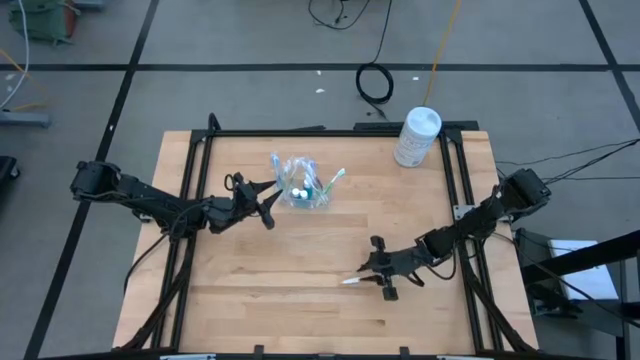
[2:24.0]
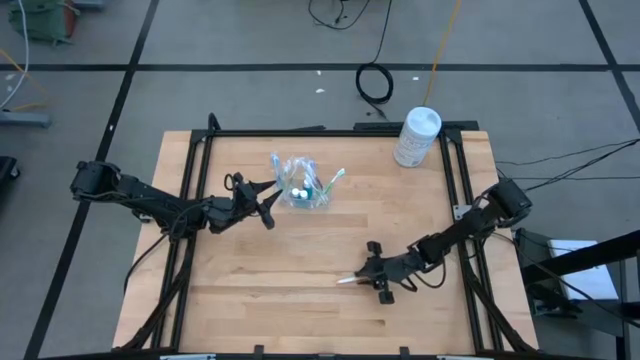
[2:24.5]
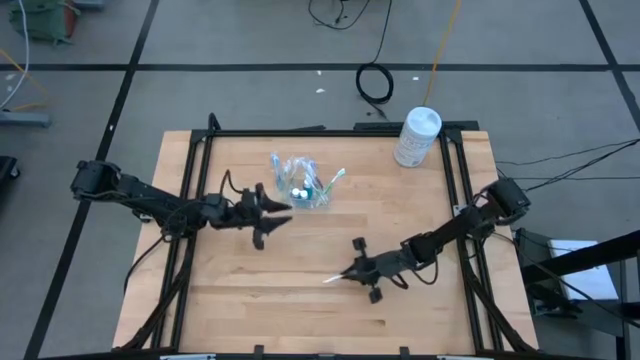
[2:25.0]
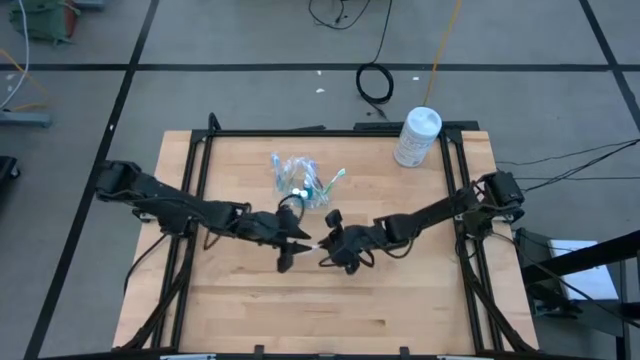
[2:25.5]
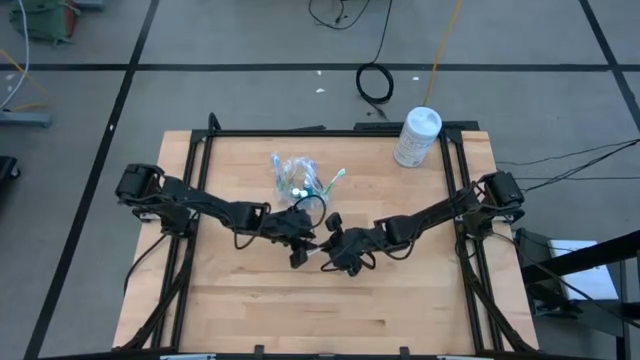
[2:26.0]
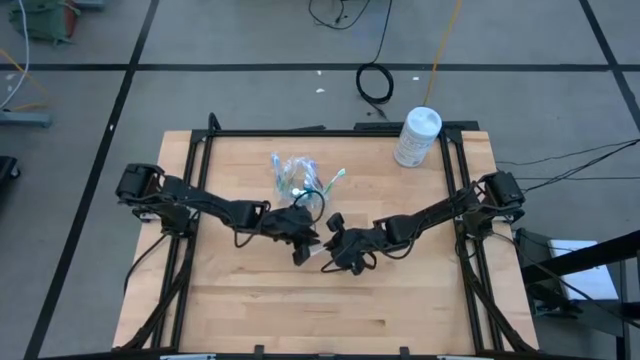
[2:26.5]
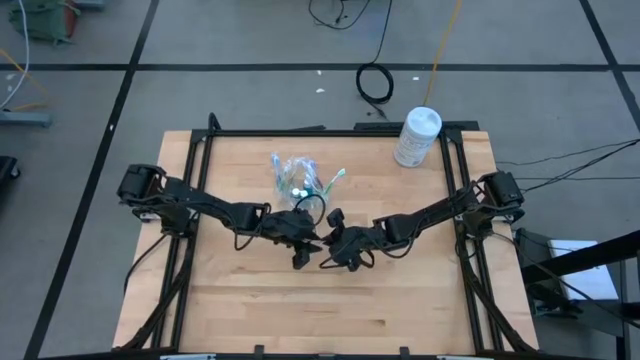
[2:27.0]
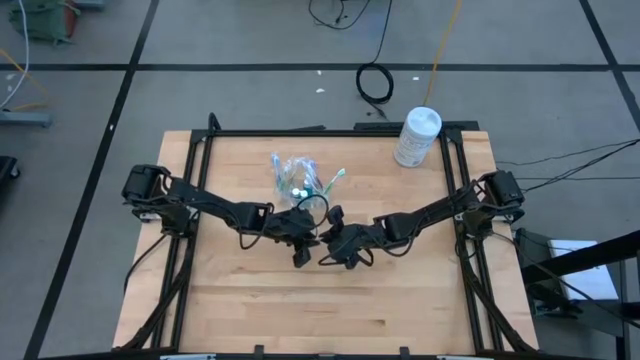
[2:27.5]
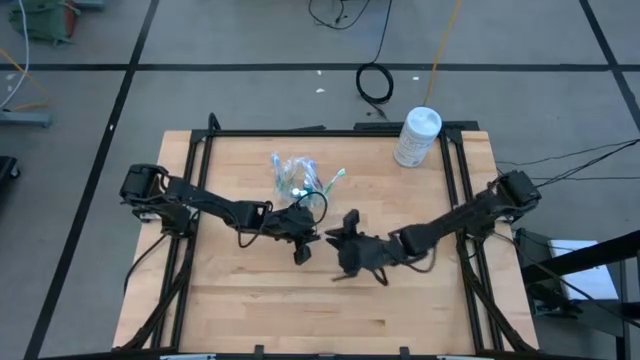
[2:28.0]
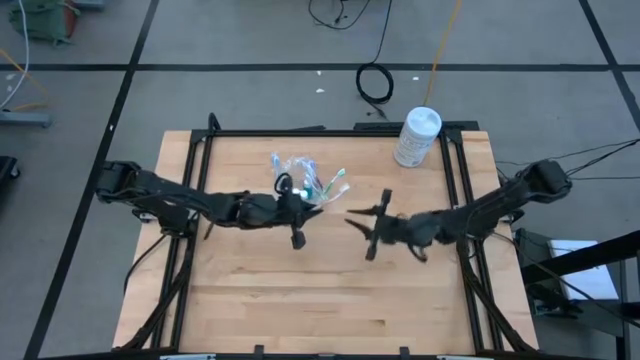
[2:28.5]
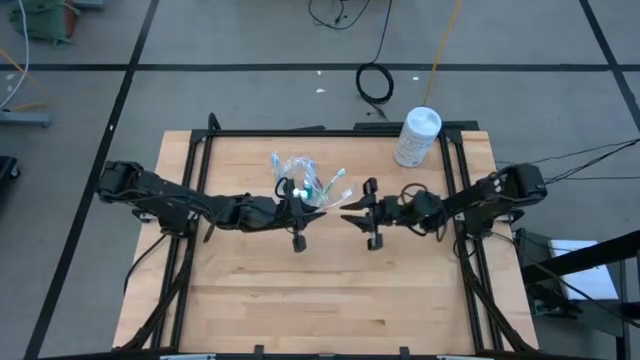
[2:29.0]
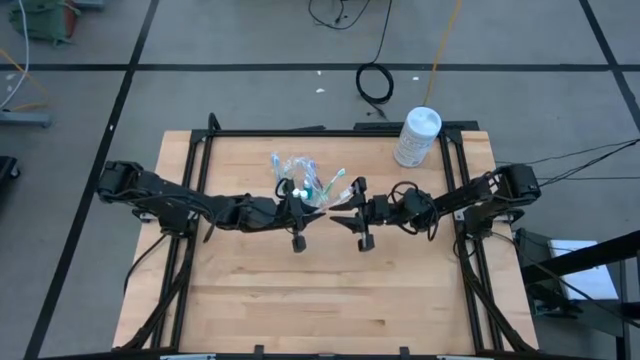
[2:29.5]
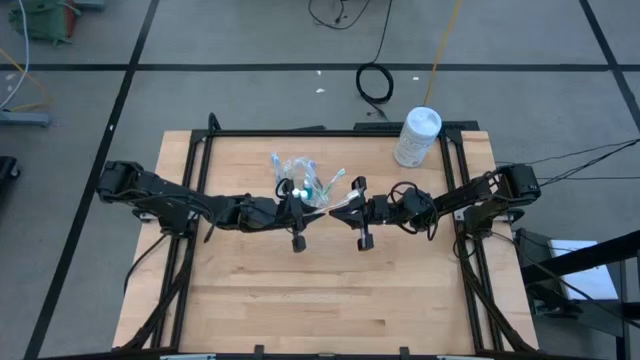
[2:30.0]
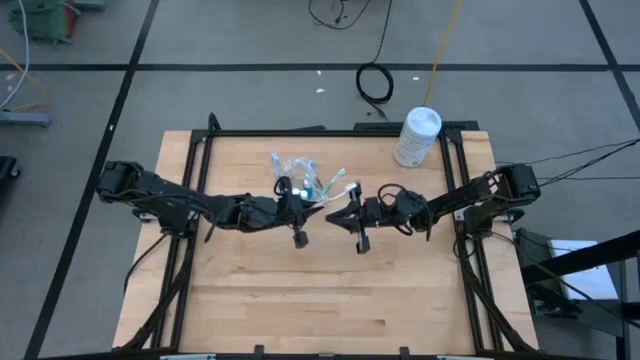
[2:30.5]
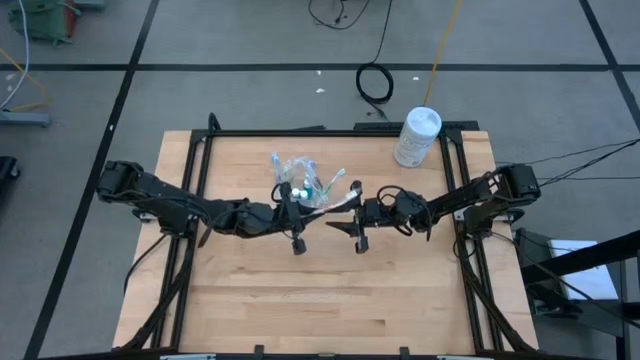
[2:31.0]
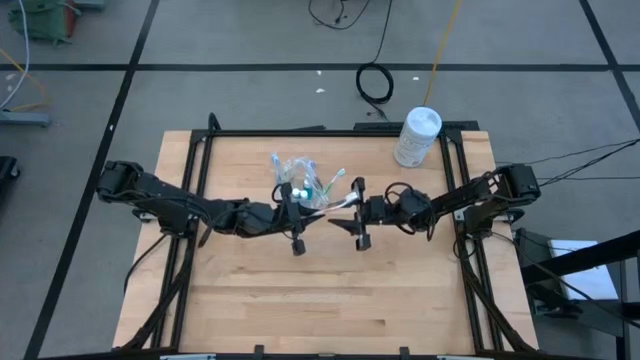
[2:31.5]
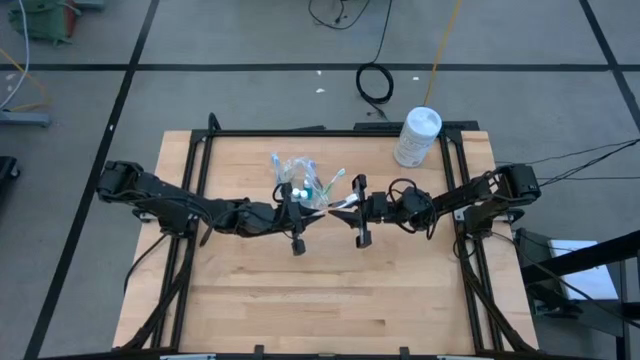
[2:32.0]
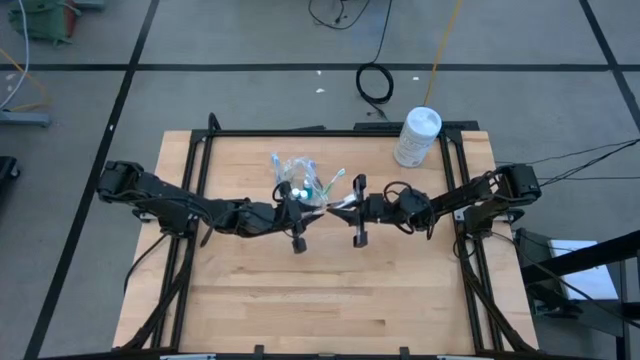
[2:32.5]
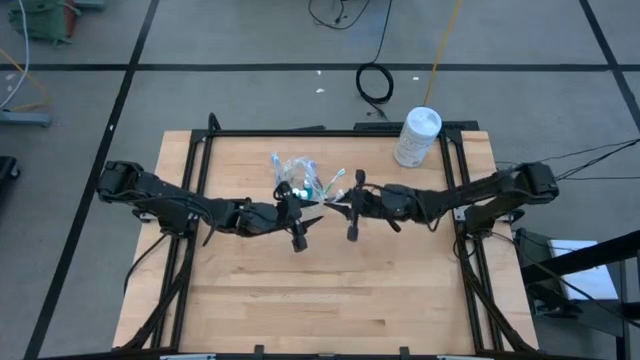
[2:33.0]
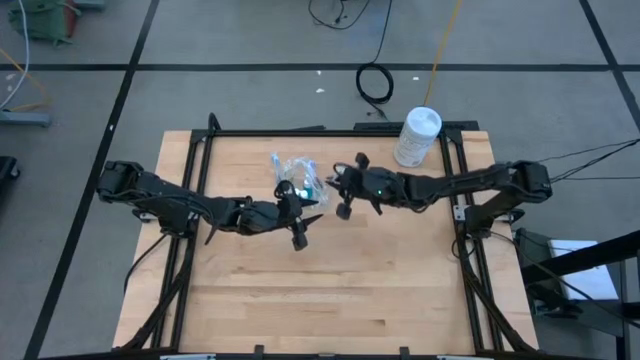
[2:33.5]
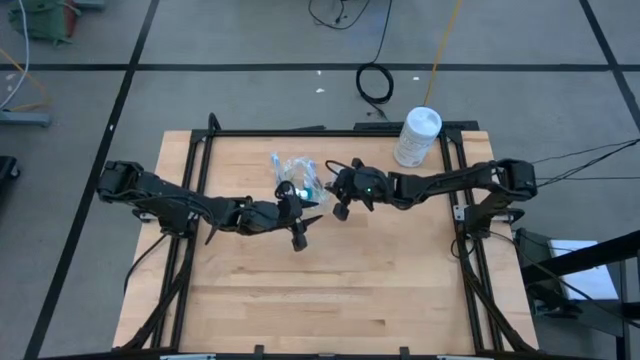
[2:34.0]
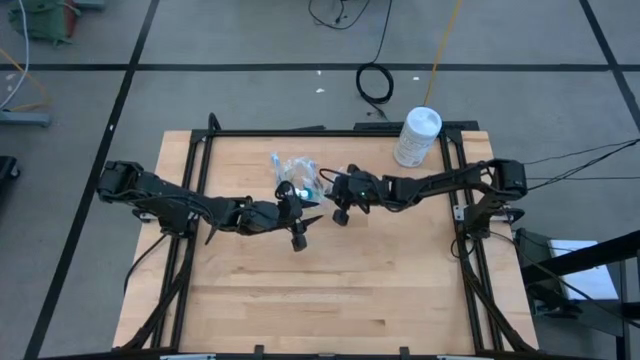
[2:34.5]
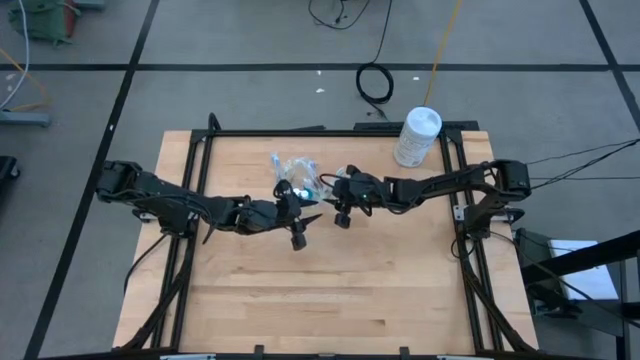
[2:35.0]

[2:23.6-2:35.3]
Task: Pick & Place toothbrushing station
Put the orange toothbrush into the transparent organizer

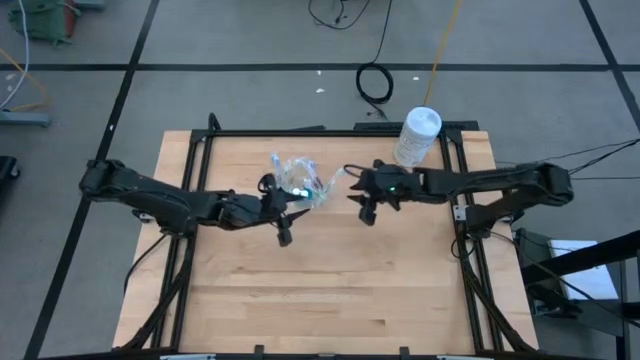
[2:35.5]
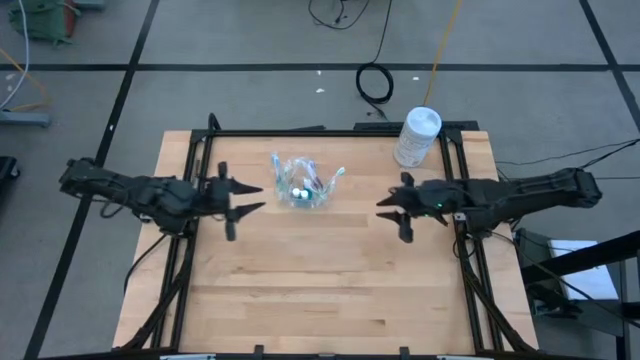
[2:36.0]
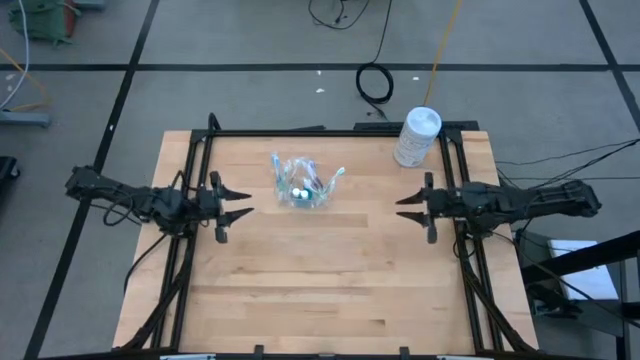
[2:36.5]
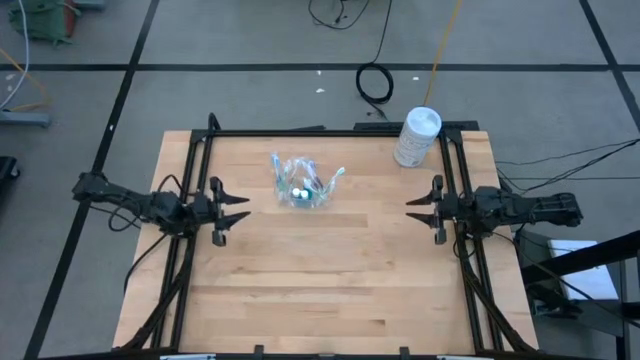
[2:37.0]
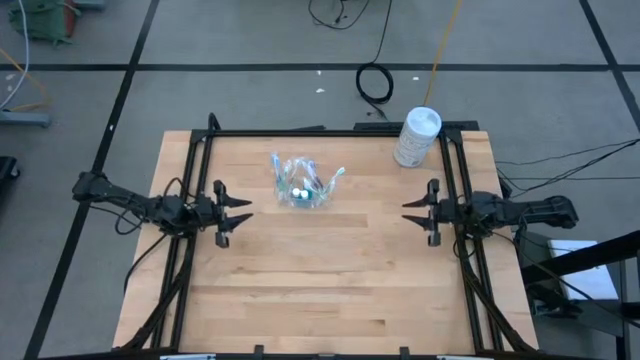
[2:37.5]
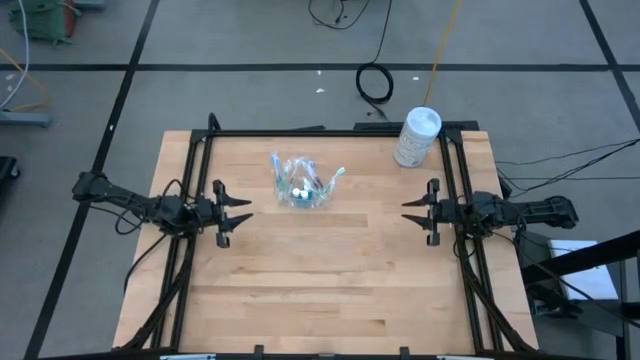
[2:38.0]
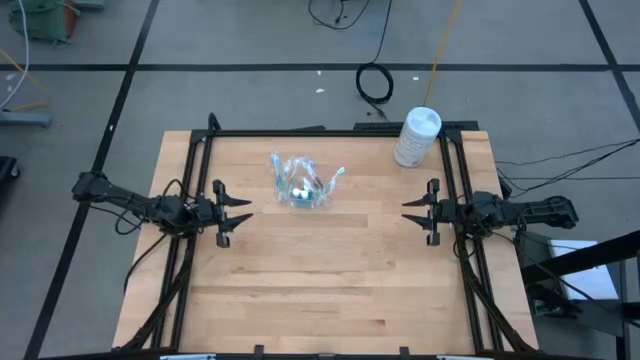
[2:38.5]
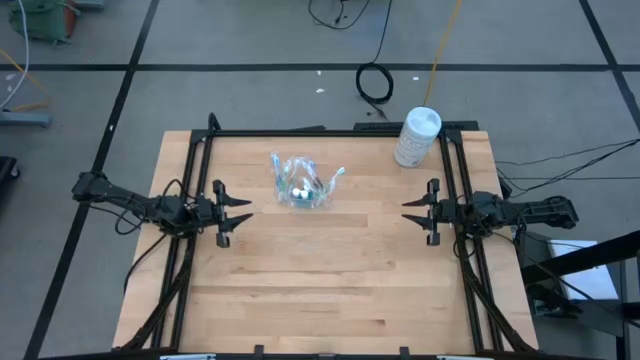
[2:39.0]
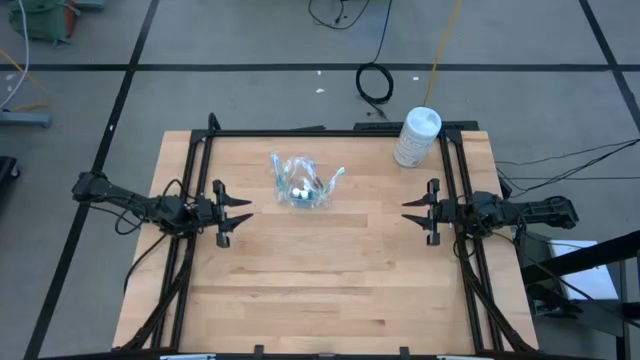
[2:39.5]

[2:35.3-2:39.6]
Return to Home Position

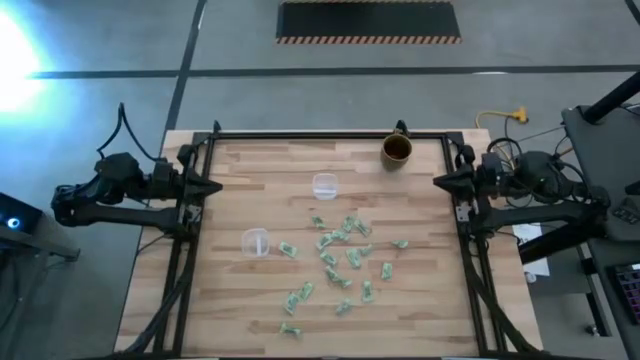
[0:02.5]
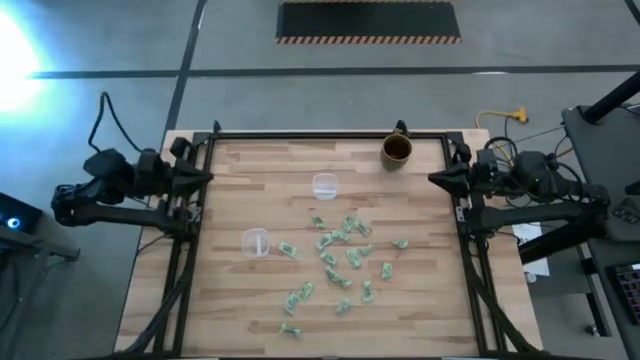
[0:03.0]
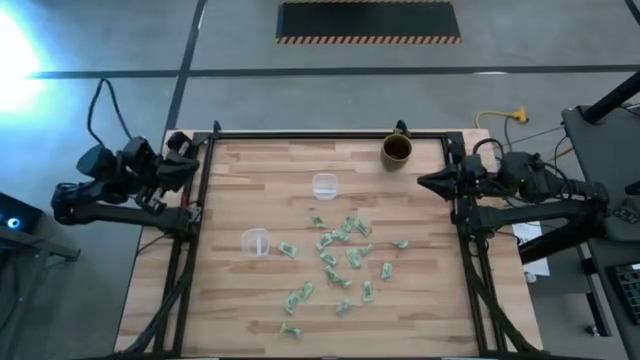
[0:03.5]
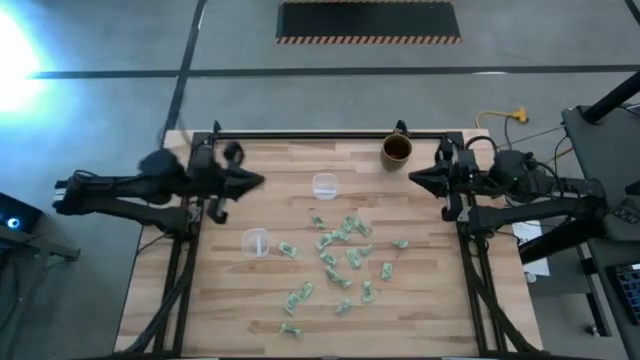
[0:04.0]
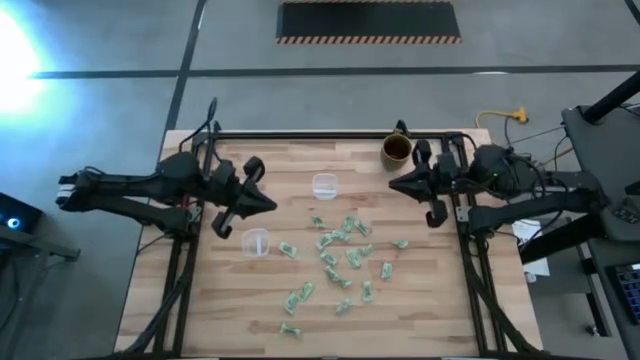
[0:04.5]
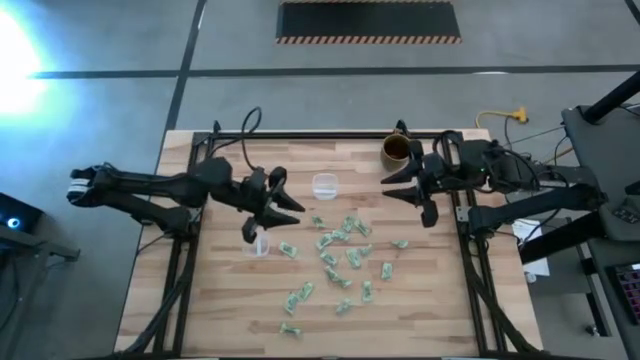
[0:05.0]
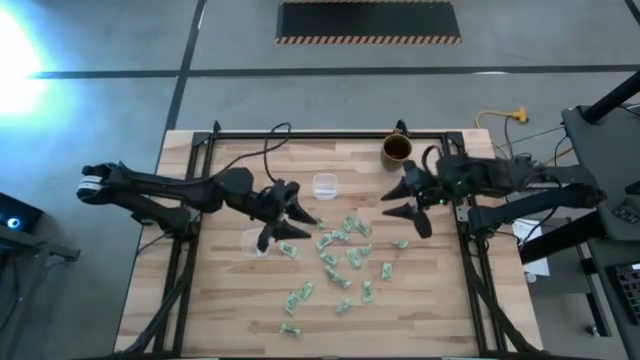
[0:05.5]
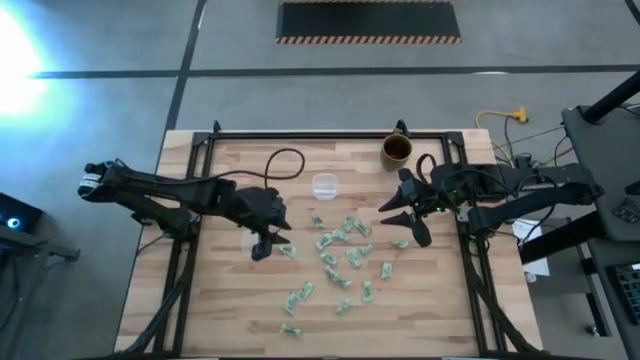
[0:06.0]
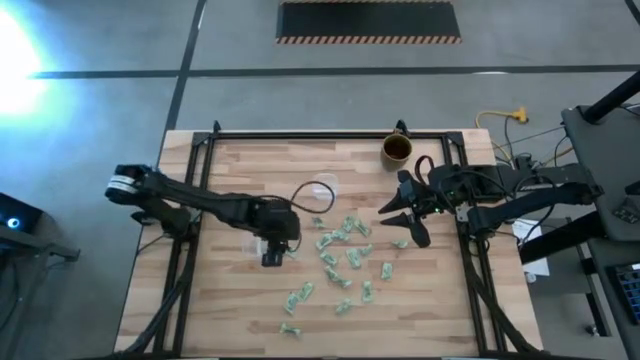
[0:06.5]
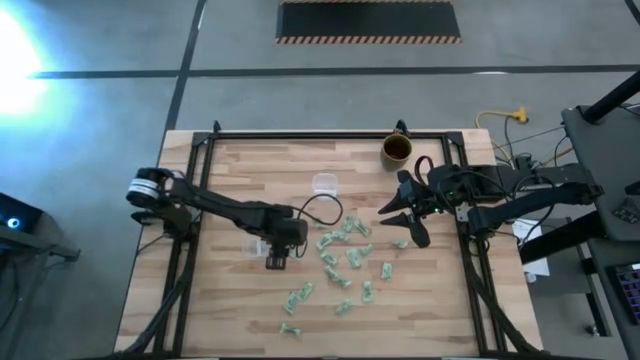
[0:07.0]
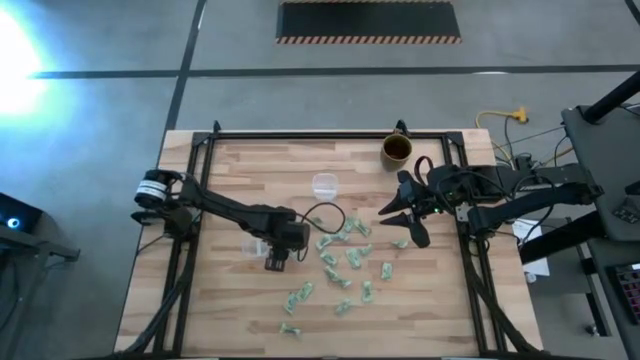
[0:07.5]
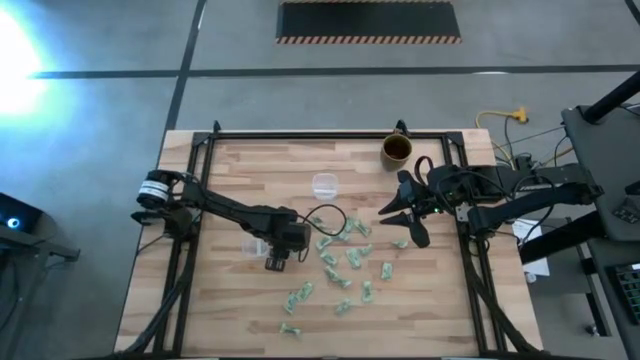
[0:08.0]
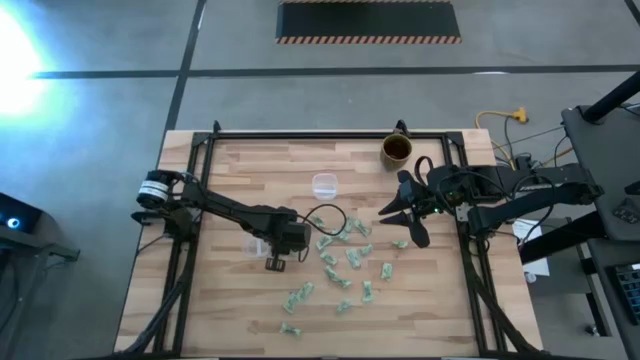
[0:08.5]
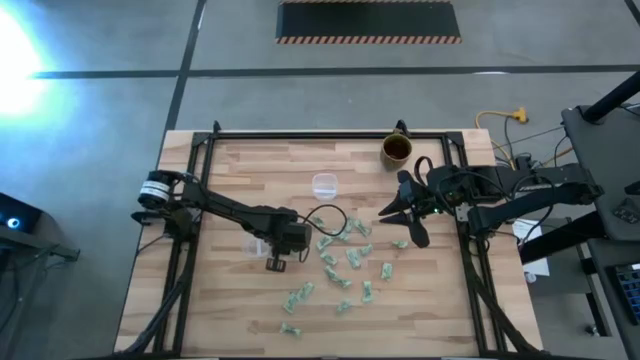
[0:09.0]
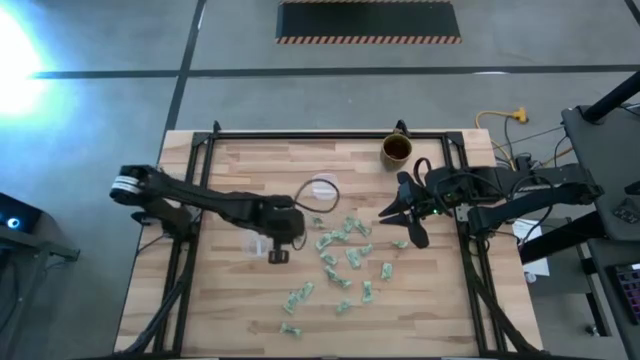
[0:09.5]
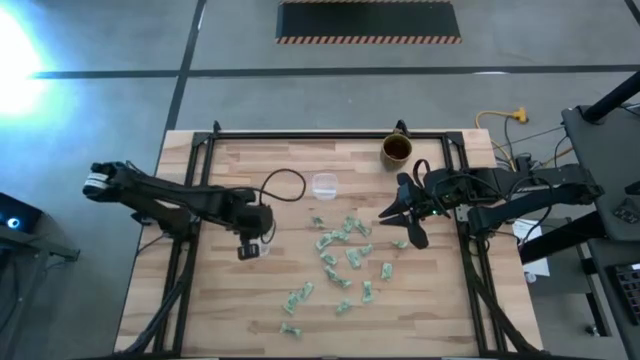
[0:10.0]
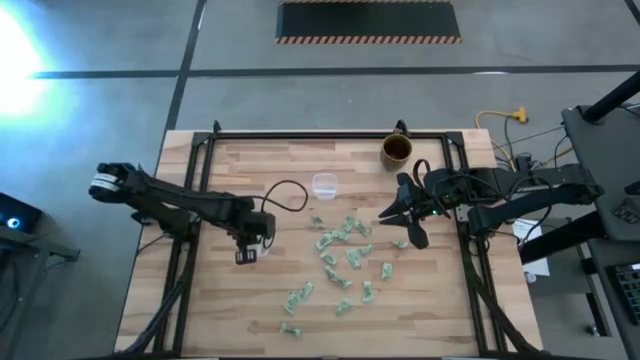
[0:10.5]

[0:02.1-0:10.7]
Task: Pick and place Stevia / Truvia into bins
Put the stevia packet into the bottom transparent container
